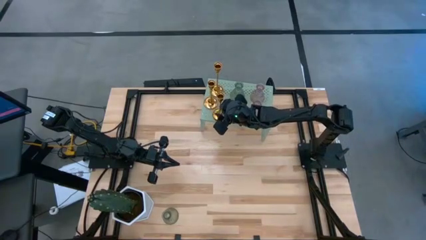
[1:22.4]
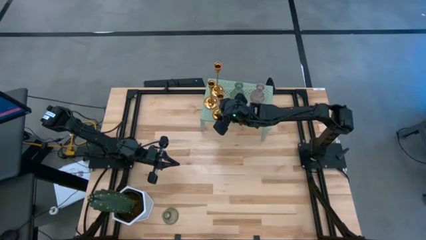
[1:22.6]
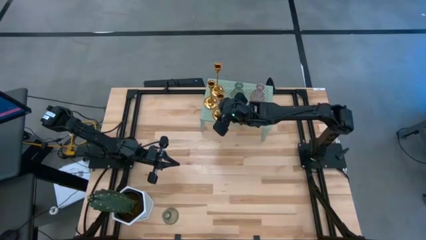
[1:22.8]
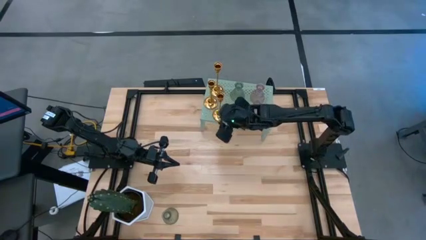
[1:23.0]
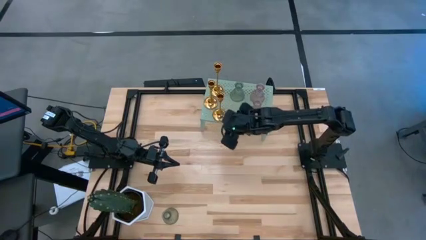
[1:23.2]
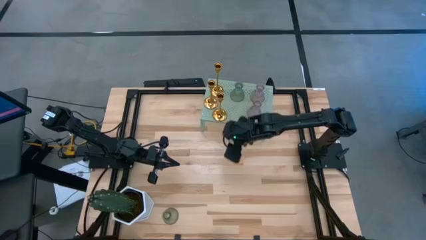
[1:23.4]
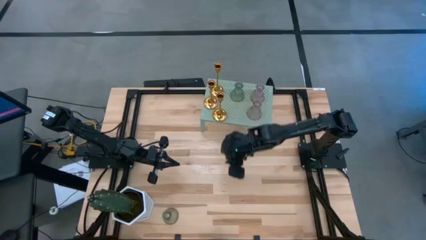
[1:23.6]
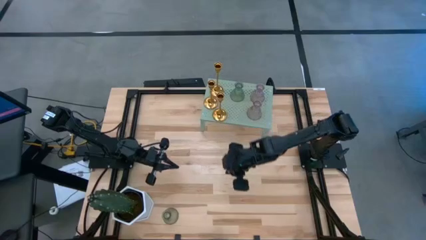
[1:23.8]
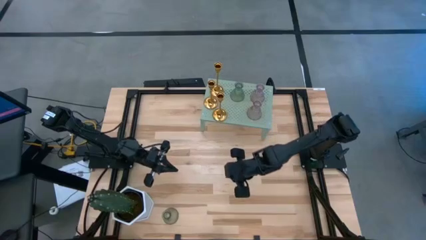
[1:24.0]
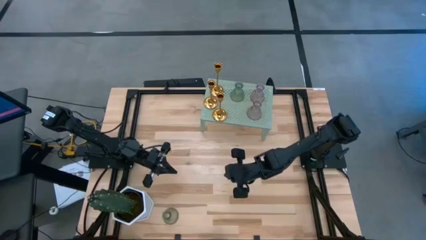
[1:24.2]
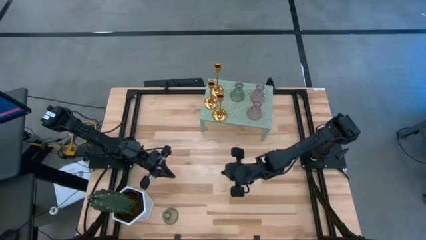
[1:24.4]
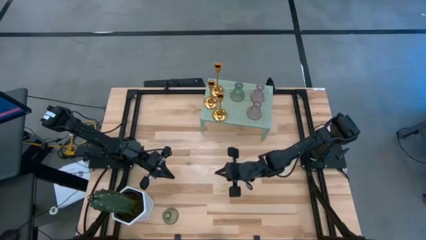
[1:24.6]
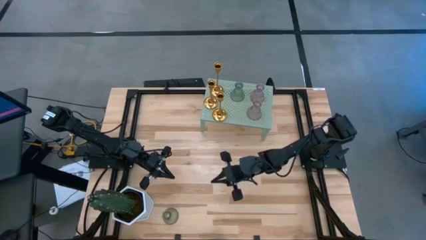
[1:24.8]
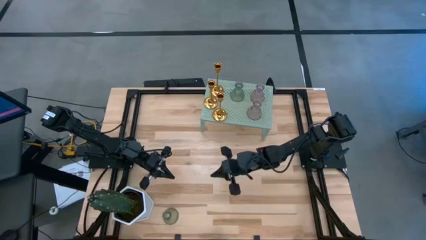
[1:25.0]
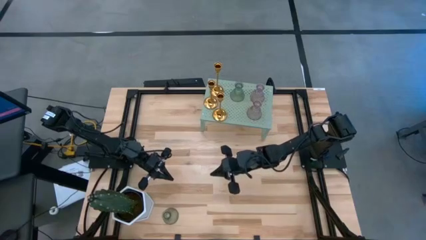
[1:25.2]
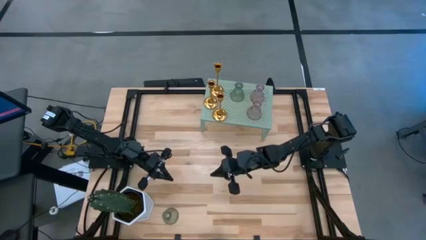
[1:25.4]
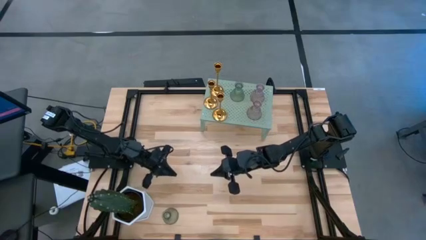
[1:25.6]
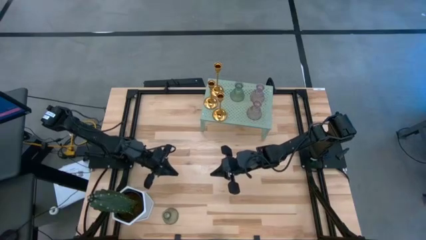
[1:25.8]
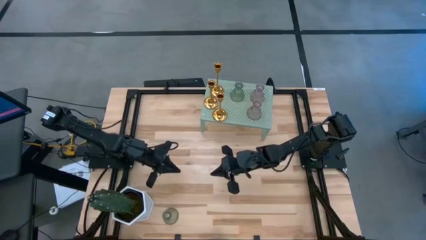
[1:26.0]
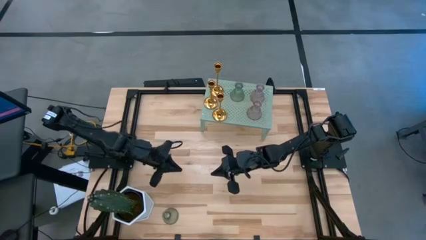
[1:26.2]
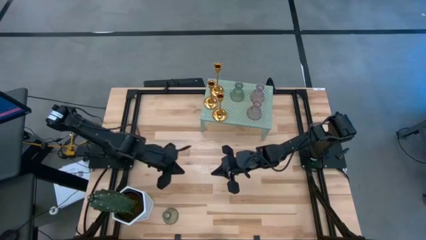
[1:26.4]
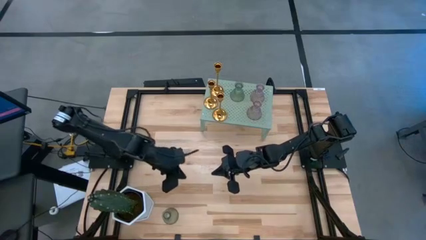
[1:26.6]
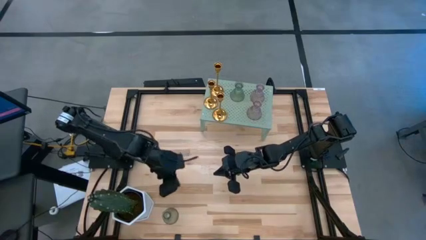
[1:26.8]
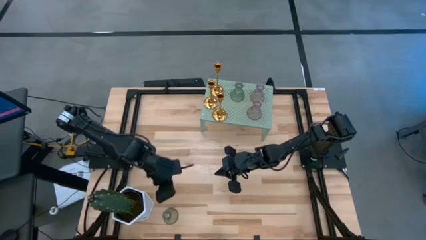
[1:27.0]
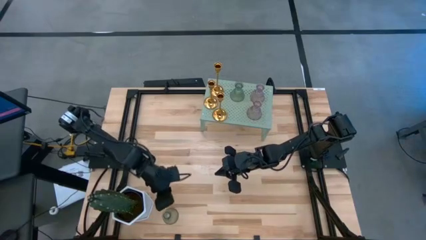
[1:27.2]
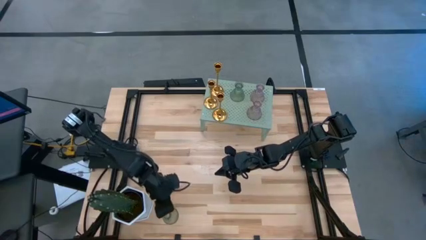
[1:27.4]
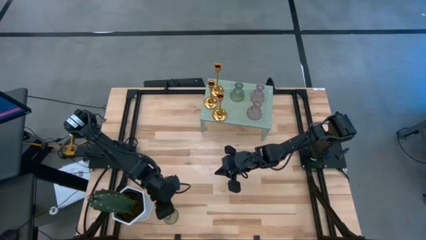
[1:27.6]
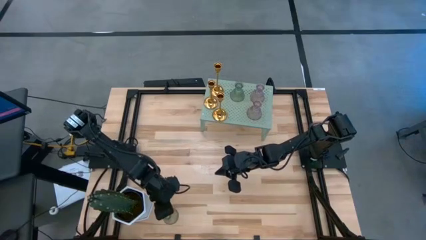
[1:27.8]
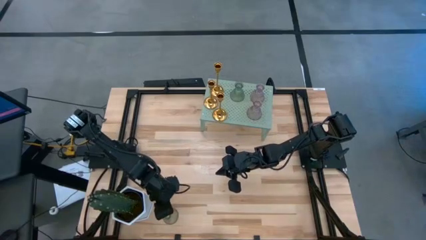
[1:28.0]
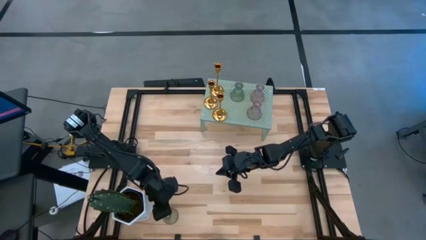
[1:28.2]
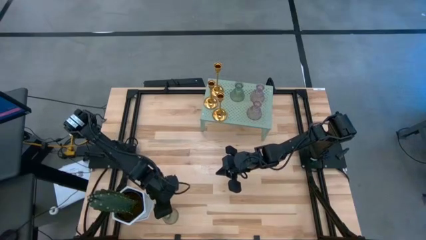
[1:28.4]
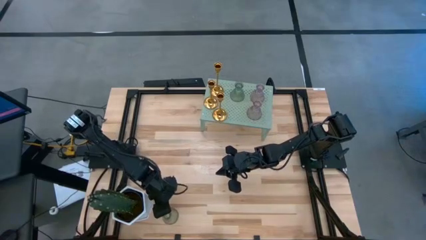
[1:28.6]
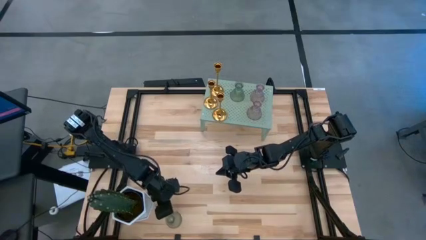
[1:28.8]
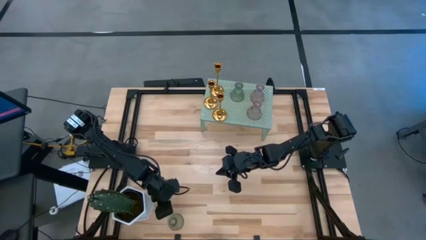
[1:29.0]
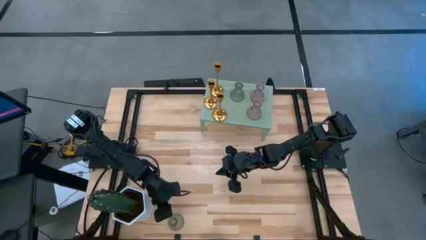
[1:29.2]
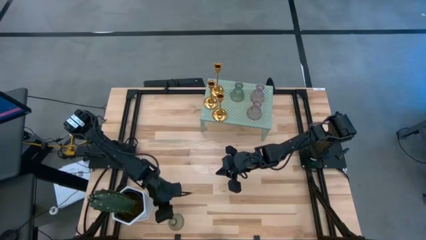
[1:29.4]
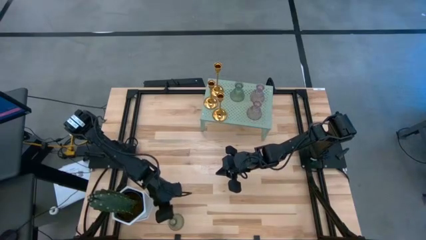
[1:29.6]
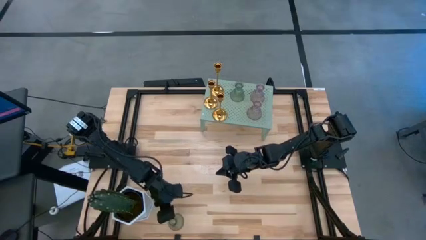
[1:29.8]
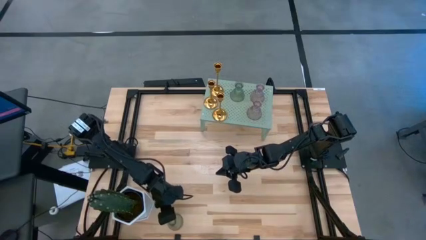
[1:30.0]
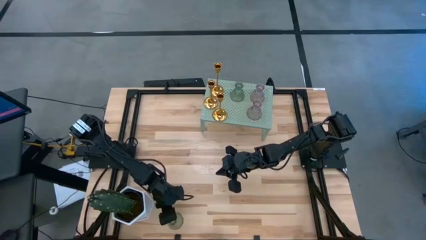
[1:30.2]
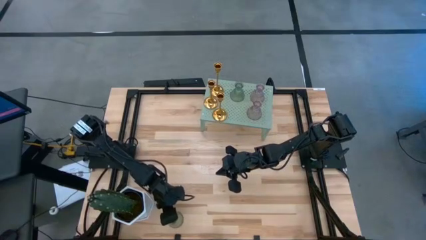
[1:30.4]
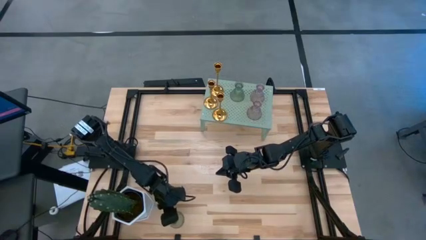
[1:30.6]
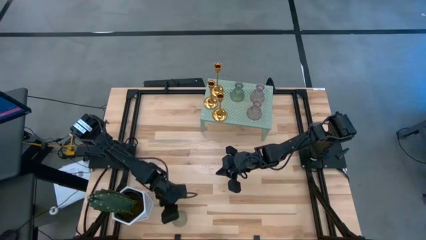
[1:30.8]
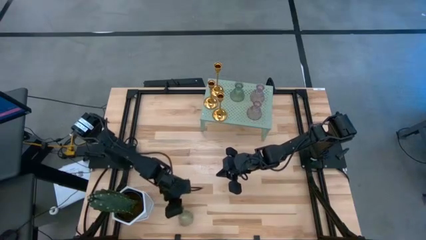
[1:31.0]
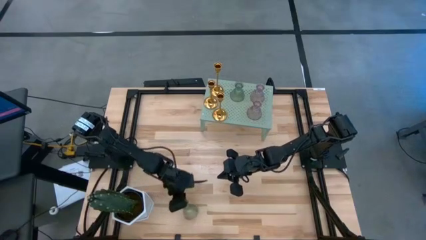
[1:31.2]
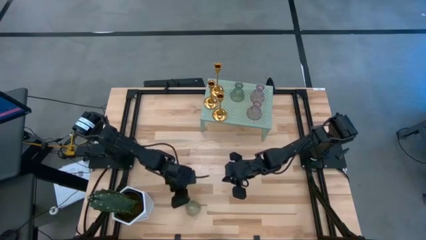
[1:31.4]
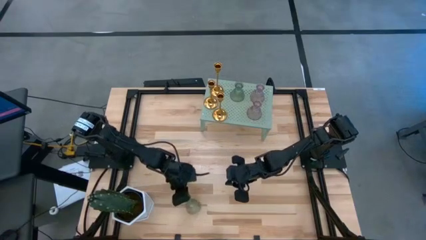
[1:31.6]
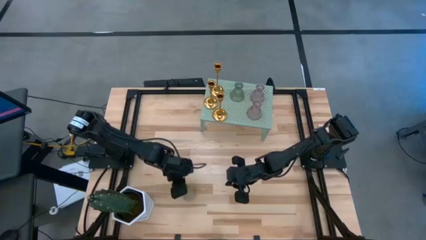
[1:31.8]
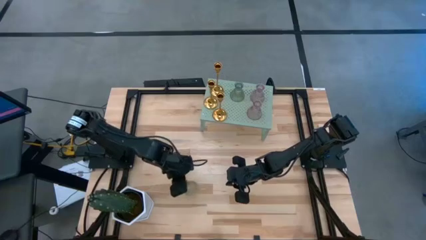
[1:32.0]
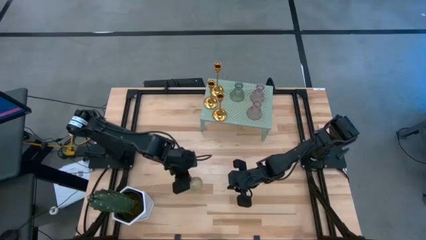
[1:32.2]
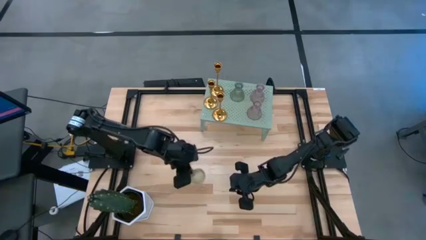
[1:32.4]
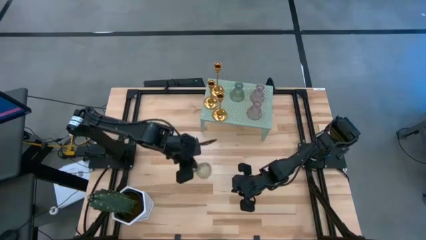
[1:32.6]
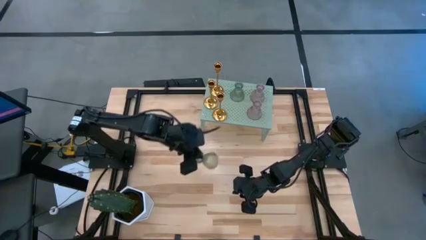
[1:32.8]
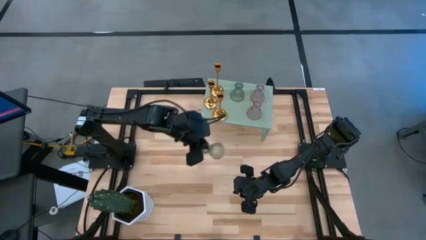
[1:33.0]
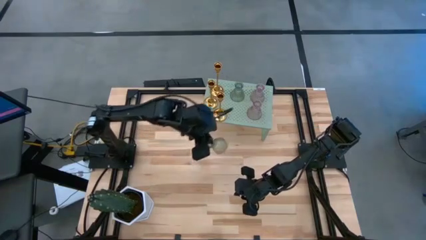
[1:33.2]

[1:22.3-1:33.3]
Task: Pick & Place candle stick holders
Put the green candle holder on the shelf aligned with the other green candle holder
